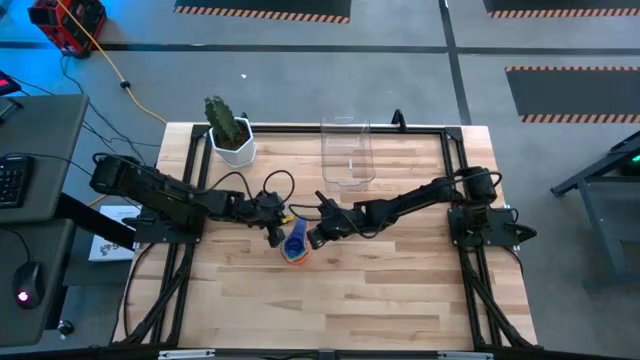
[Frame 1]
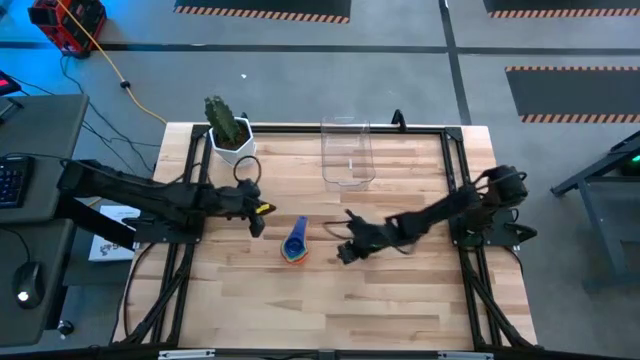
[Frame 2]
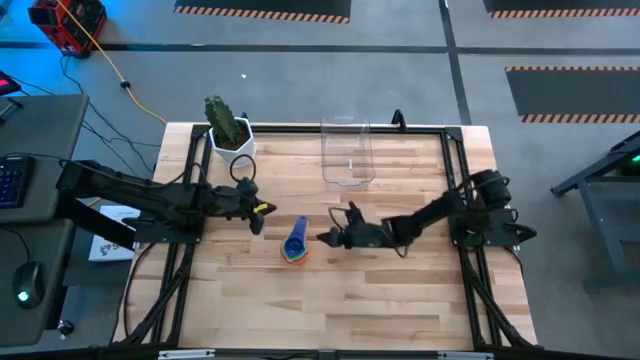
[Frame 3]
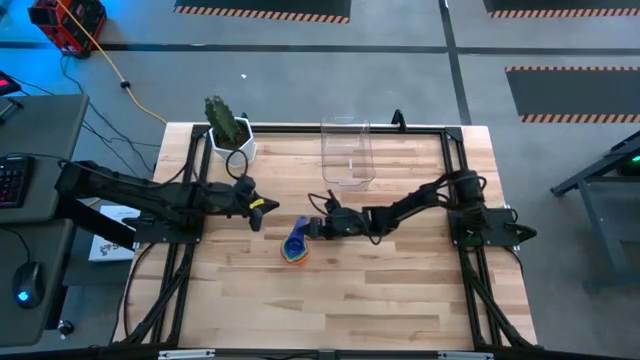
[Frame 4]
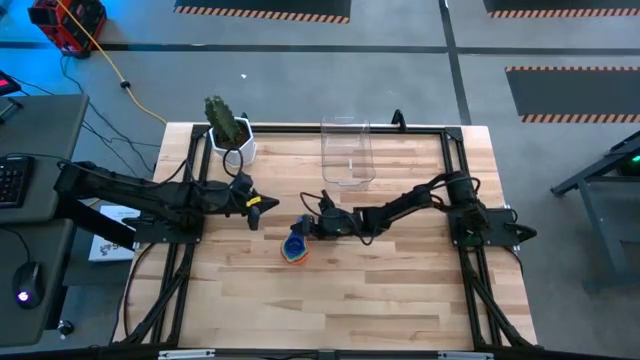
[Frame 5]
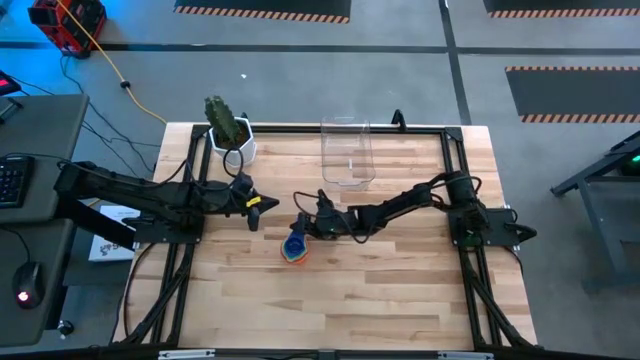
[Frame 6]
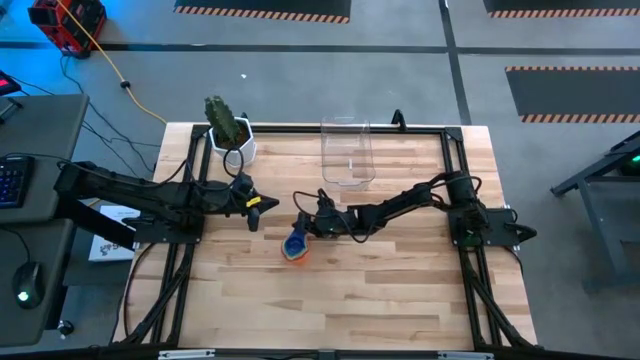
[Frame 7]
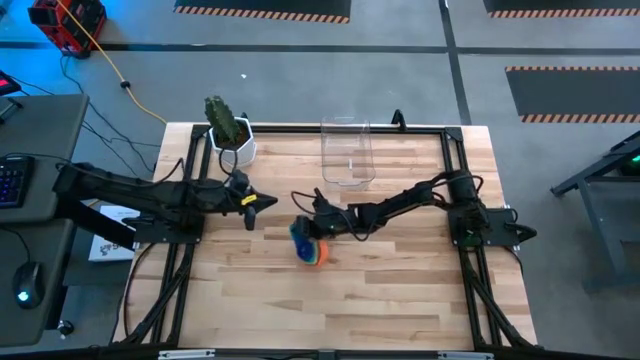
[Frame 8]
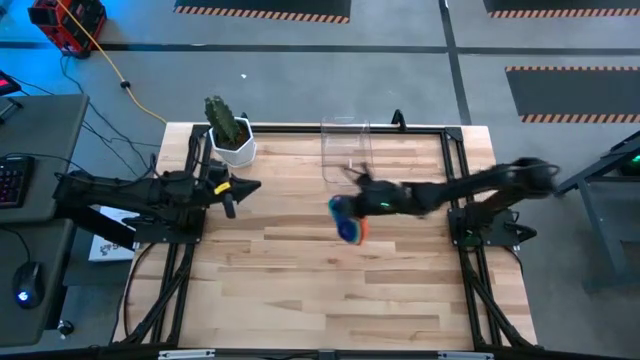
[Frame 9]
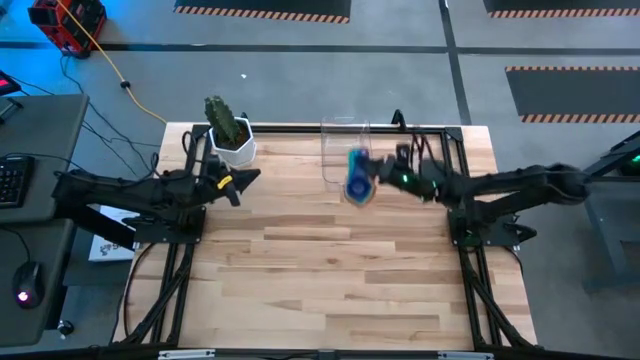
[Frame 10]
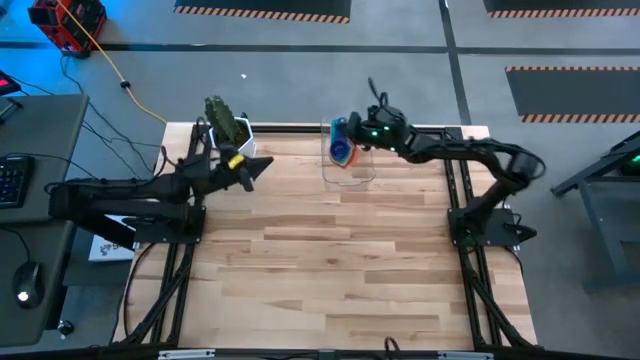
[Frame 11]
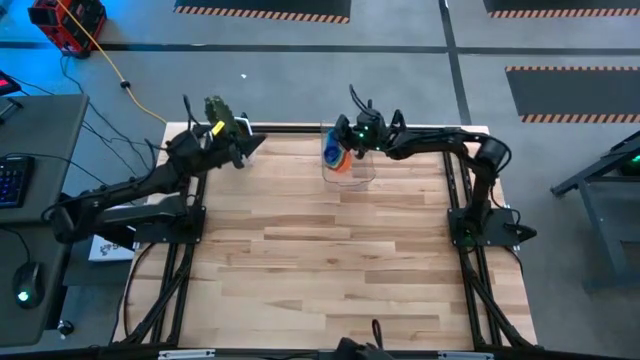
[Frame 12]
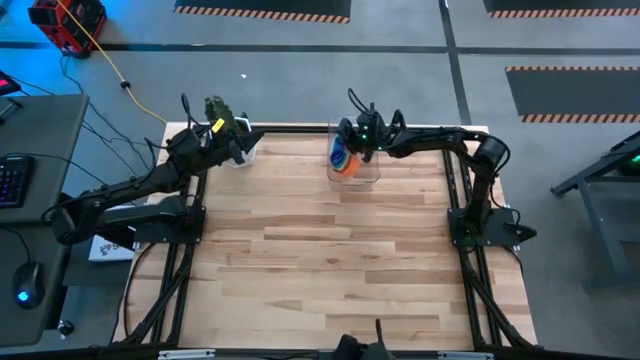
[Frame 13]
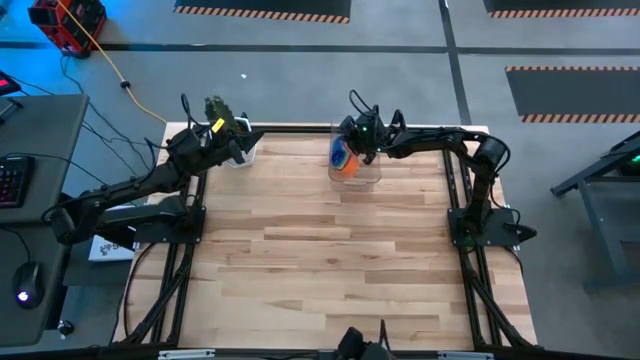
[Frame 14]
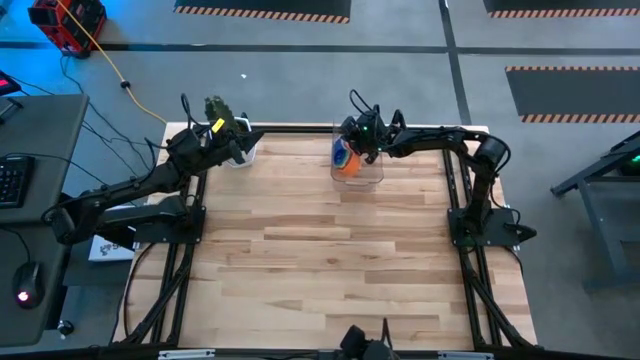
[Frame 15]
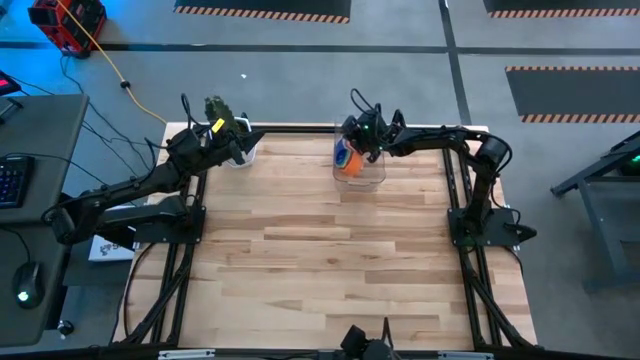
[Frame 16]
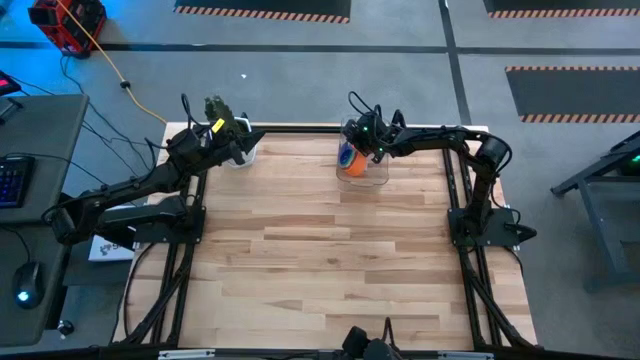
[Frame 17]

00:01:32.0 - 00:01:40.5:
Task: Nest measuring cups in basket
Put the stacked measuring cups into the transparent bin

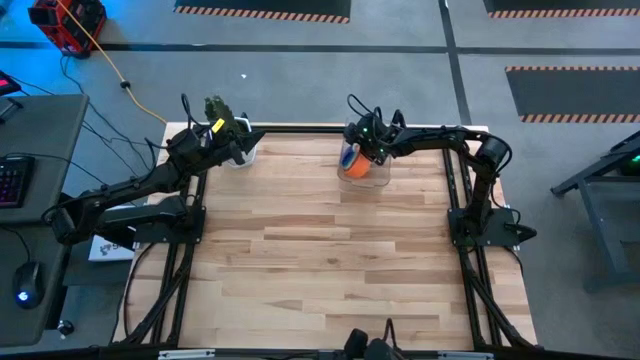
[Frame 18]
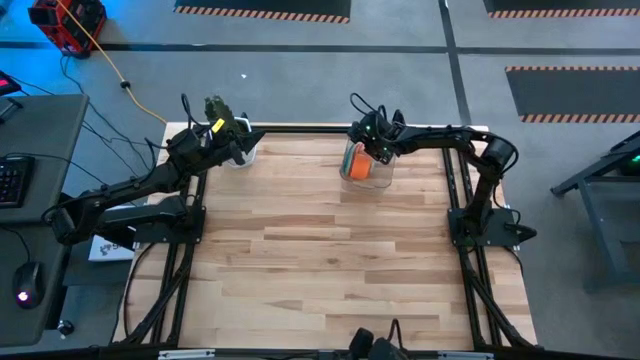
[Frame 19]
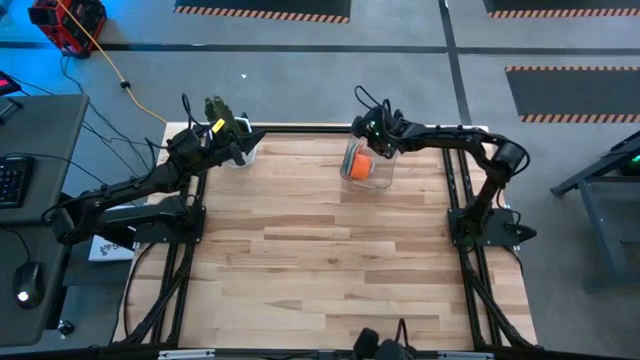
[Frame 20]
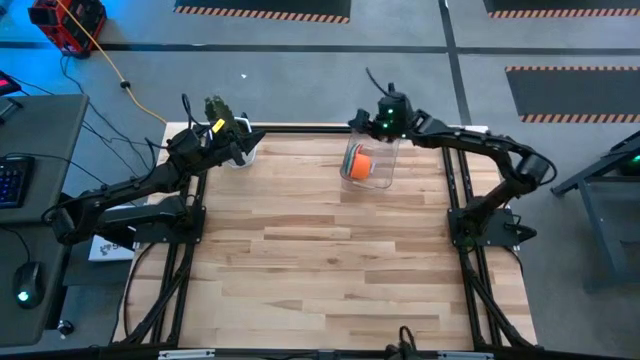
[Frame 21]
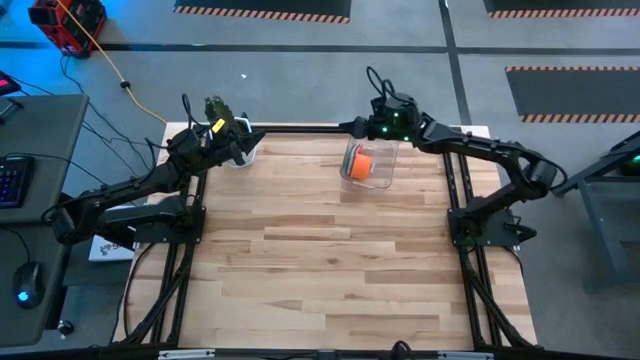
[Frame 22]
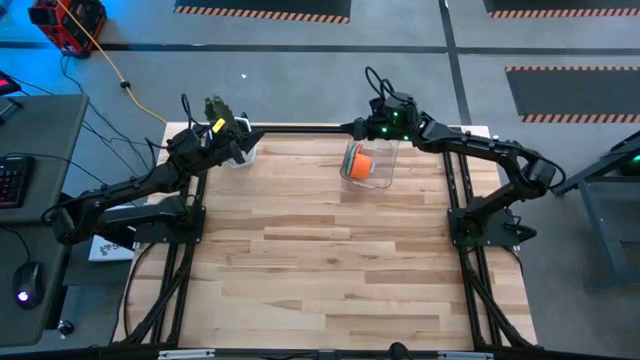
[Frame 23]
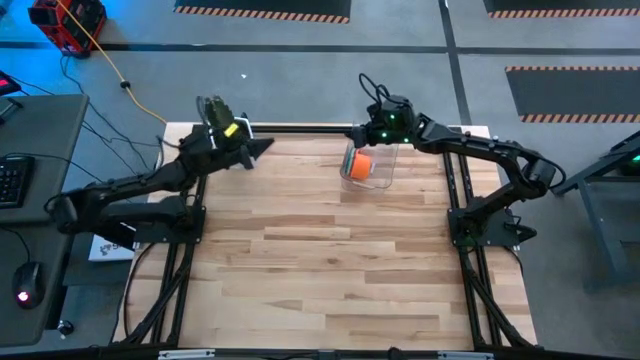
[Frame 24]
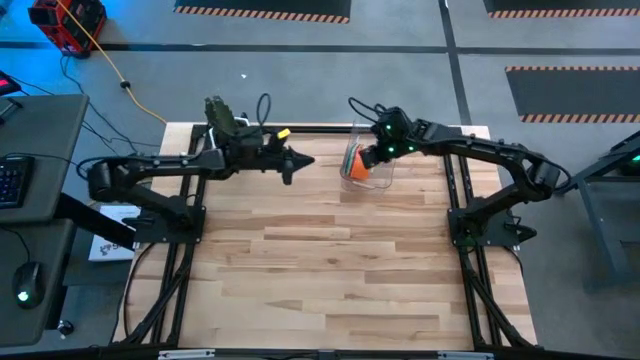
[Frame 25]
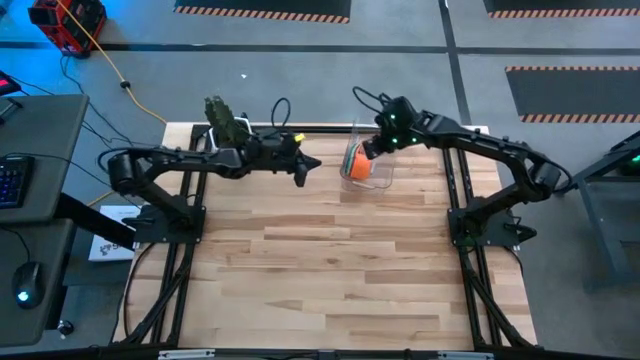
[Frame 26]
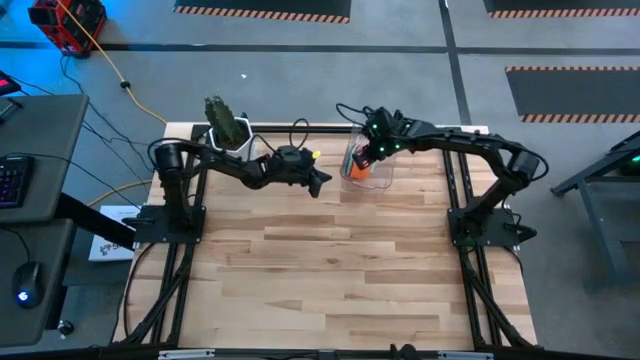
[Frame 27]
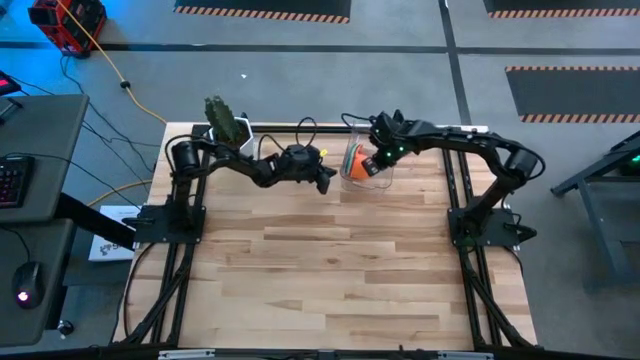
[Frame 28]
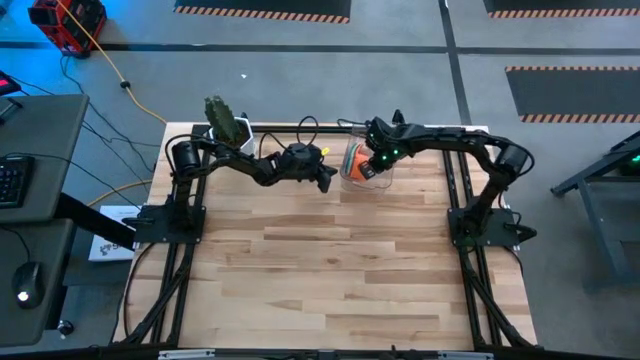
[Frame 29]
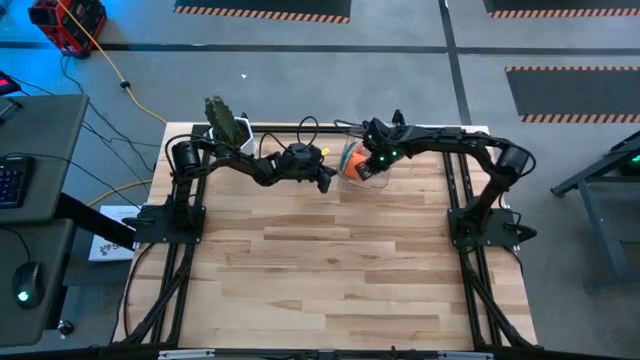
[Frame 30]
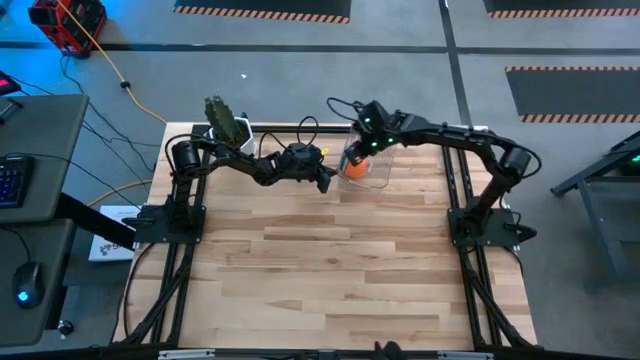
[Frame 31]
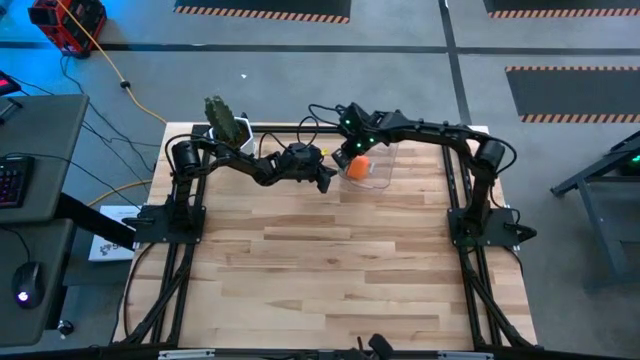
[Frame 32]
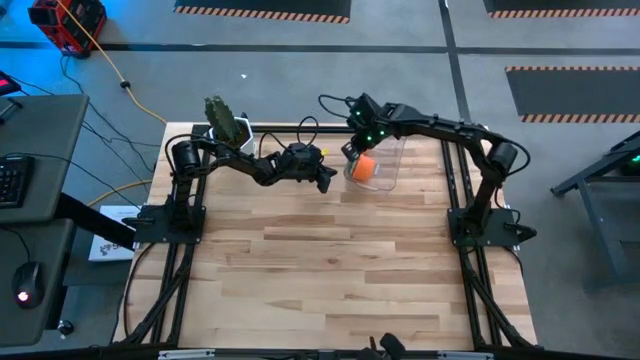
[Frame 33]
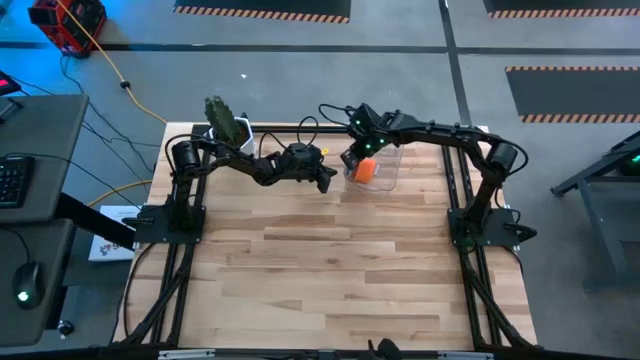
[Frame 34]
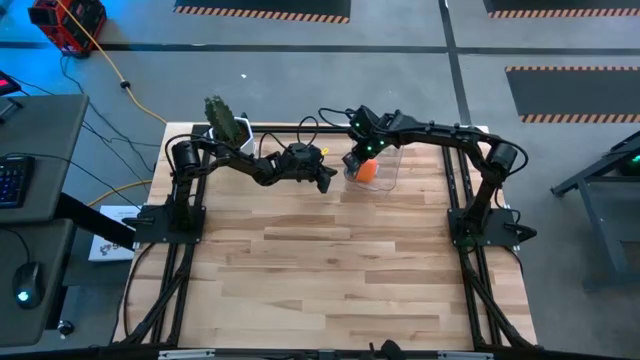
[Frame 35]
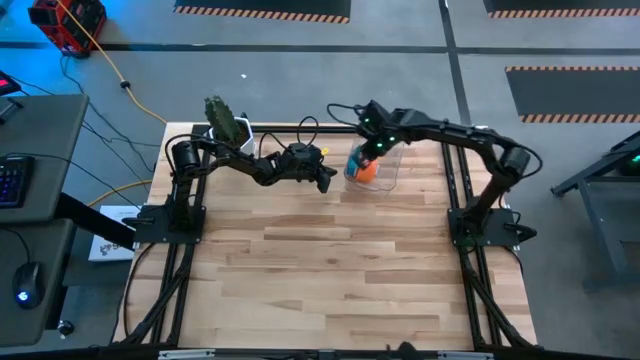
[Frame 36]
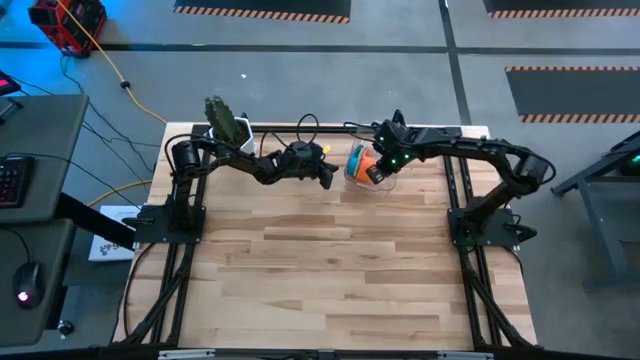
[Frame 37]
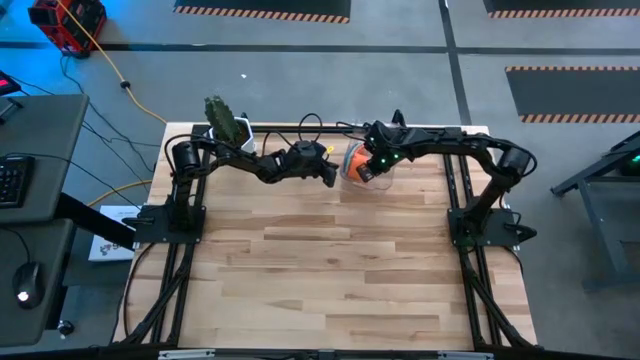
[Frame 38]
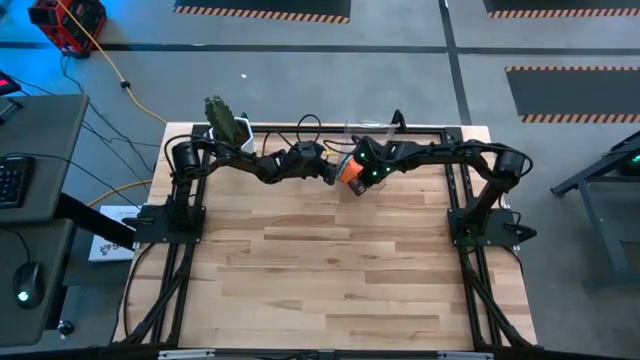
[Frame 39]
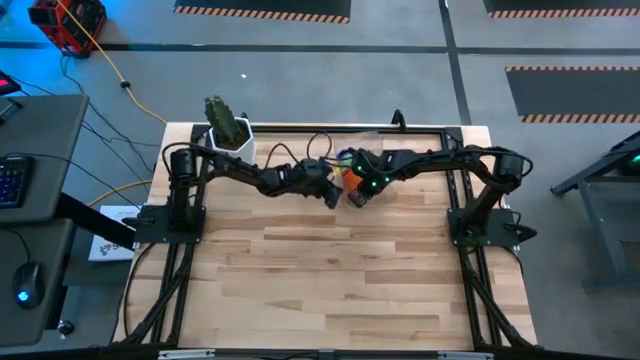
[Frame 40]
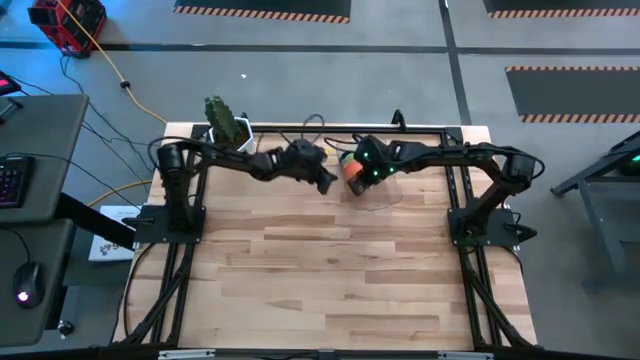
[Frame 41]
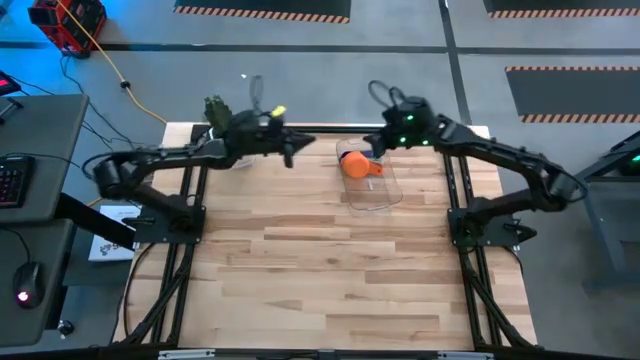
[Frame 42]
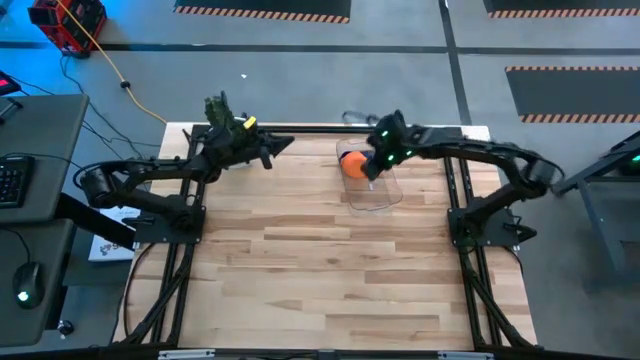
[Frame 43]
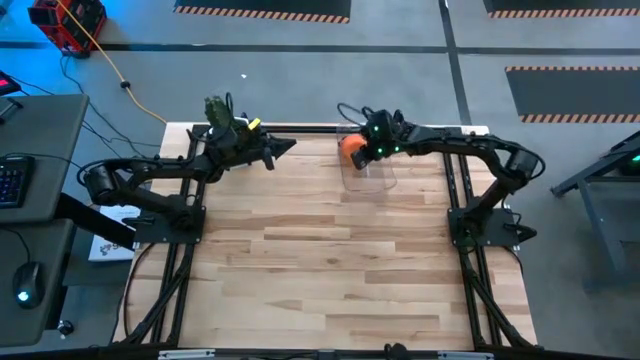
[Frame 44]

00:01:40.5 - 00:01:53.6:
Adjust the stacked measuring cups in the transparent bin
